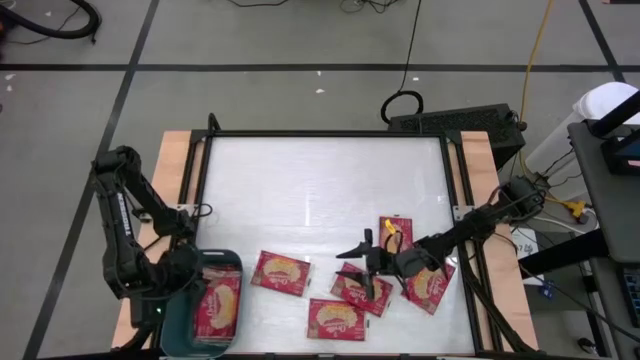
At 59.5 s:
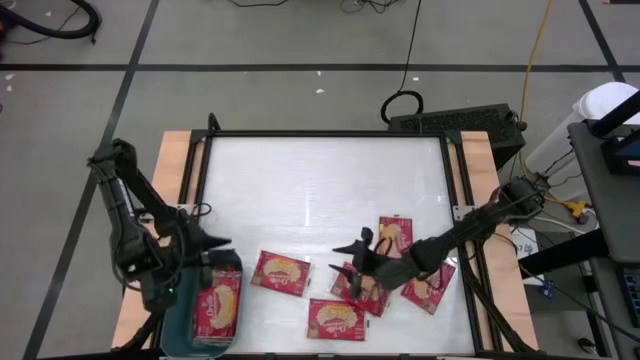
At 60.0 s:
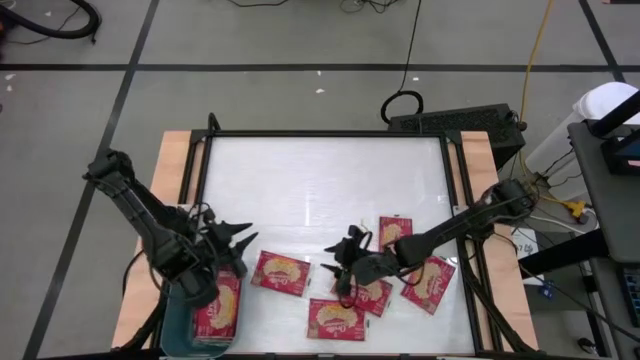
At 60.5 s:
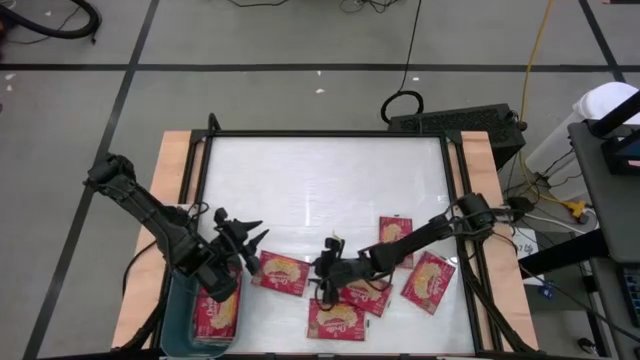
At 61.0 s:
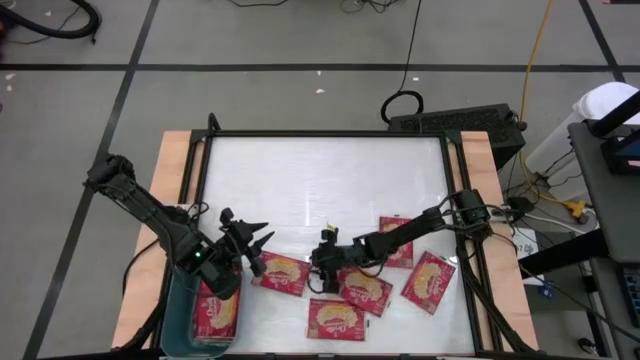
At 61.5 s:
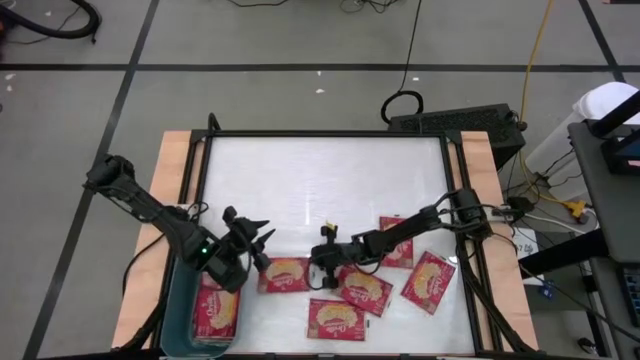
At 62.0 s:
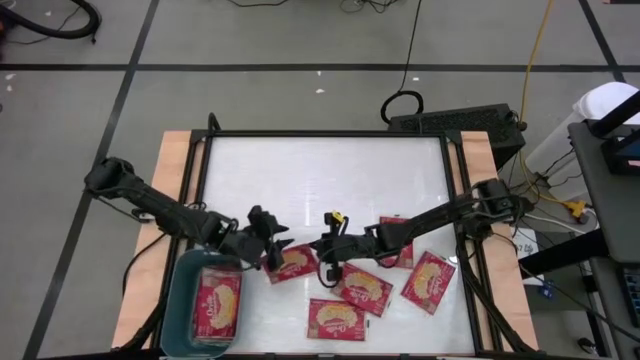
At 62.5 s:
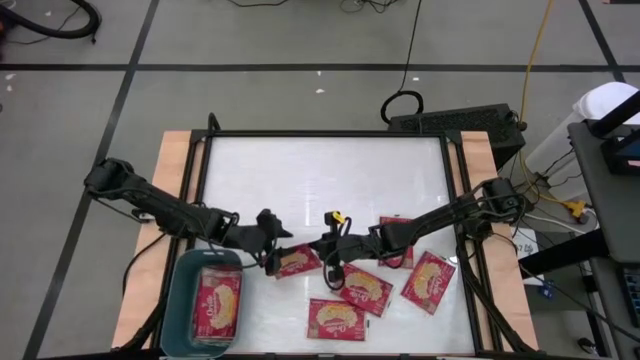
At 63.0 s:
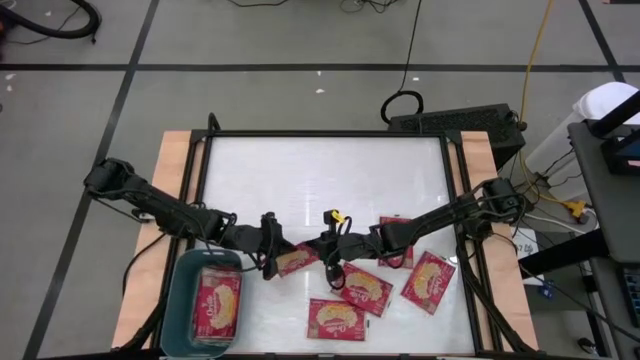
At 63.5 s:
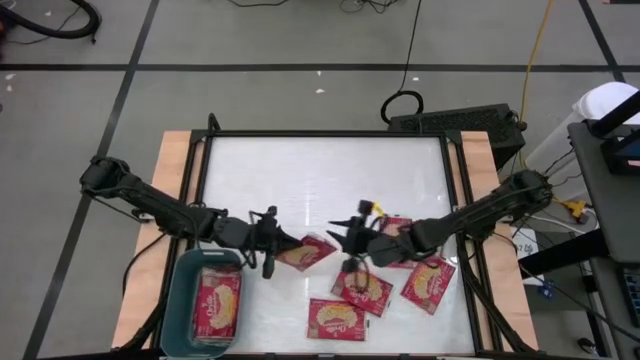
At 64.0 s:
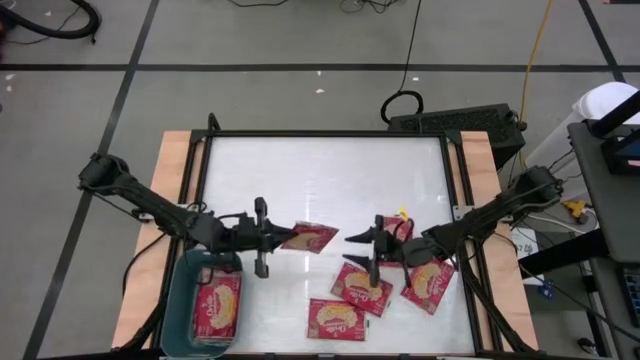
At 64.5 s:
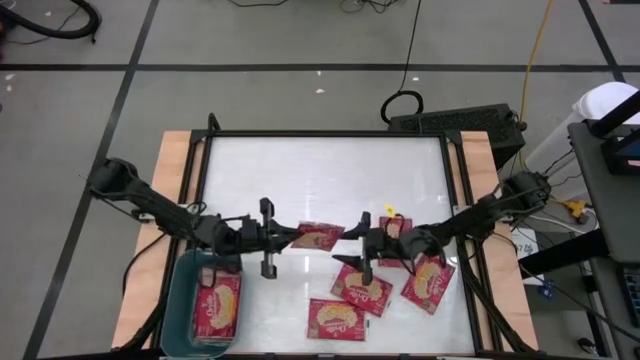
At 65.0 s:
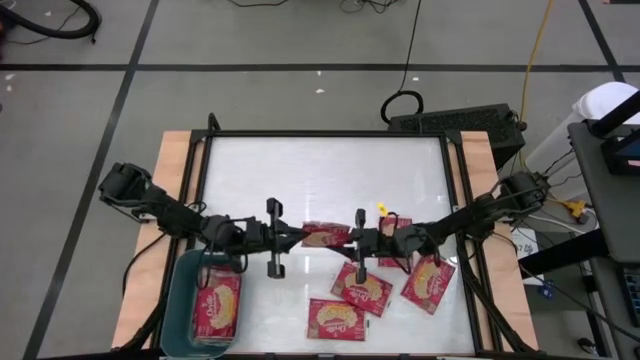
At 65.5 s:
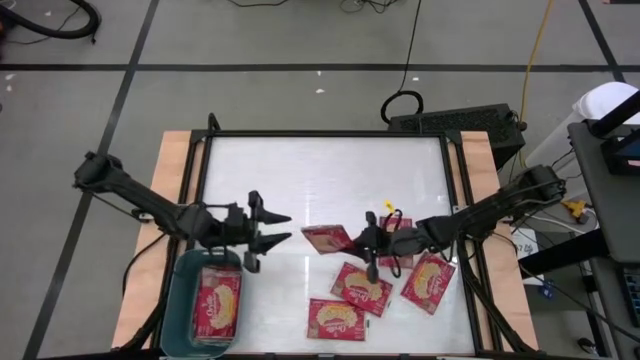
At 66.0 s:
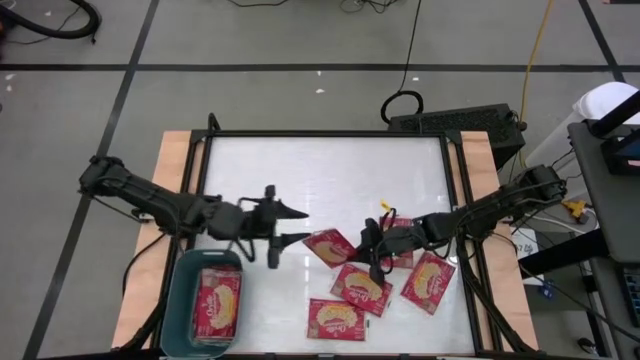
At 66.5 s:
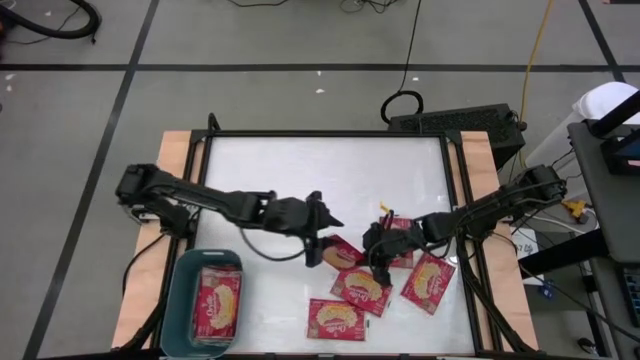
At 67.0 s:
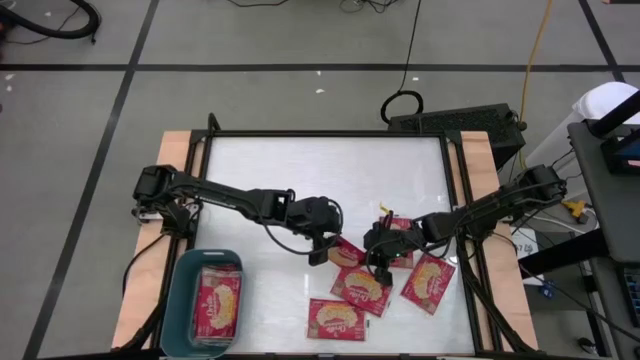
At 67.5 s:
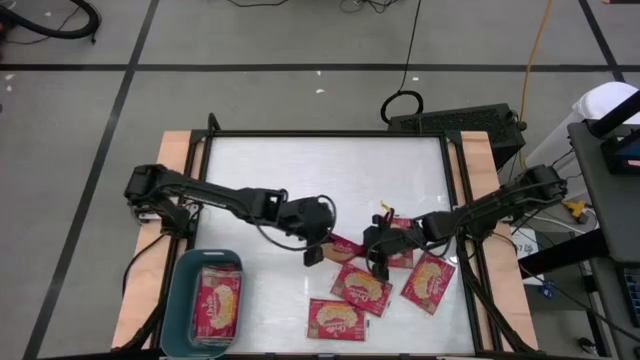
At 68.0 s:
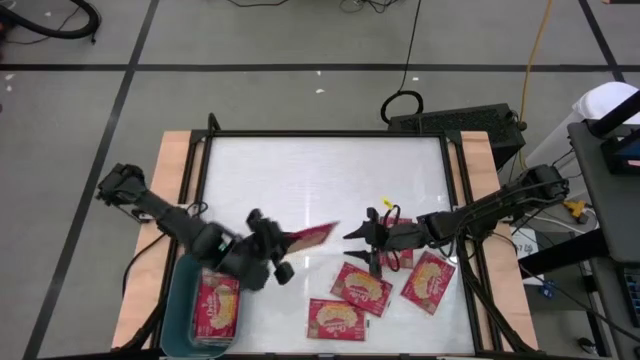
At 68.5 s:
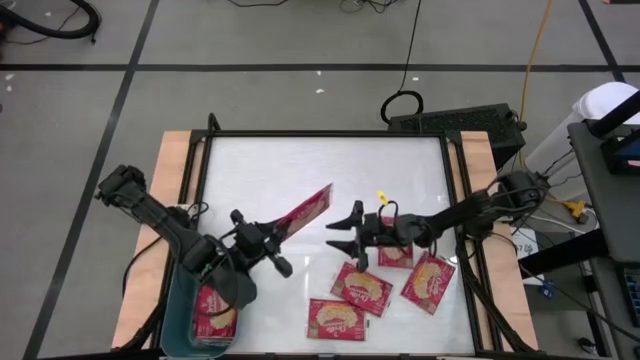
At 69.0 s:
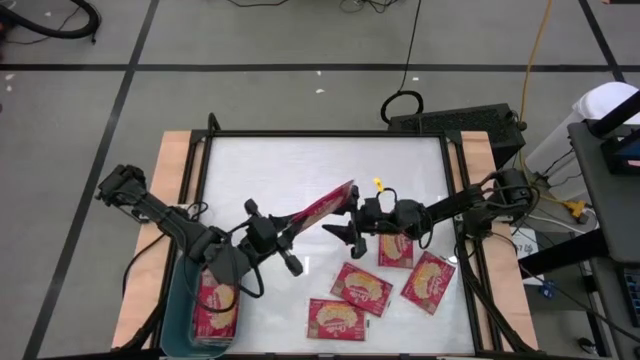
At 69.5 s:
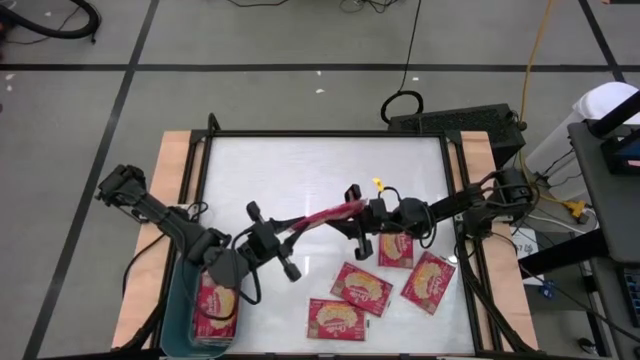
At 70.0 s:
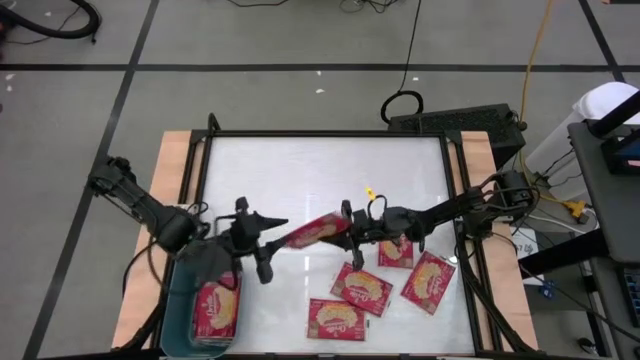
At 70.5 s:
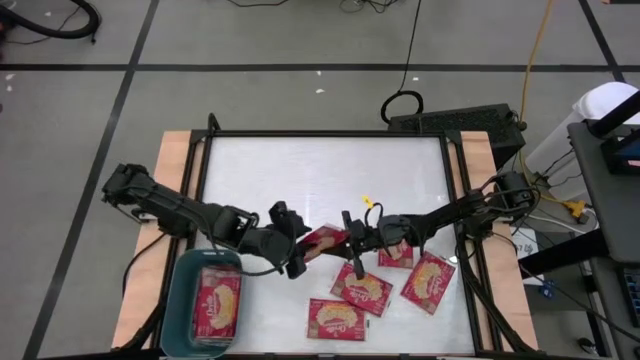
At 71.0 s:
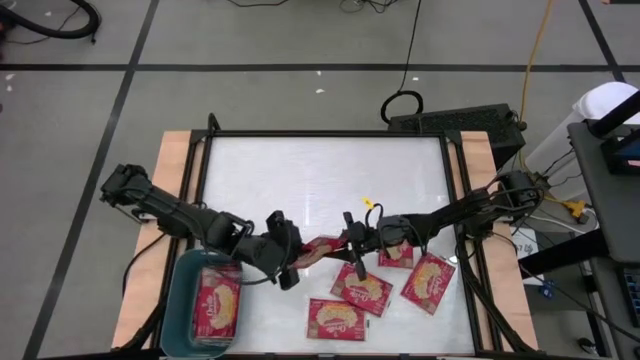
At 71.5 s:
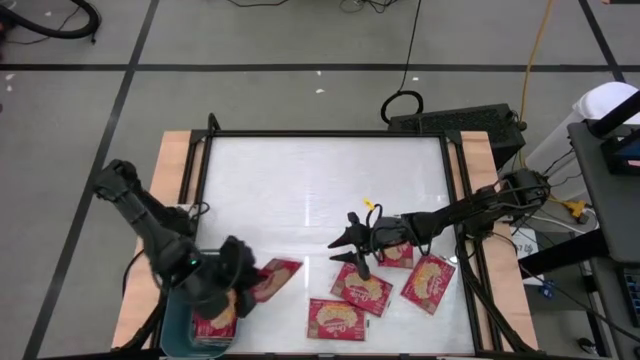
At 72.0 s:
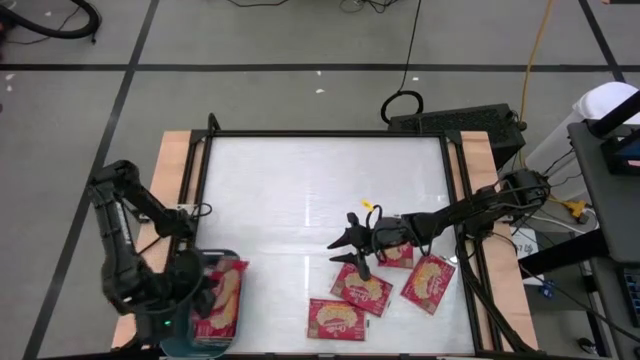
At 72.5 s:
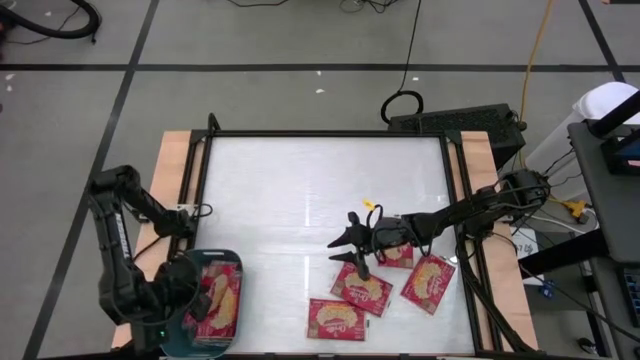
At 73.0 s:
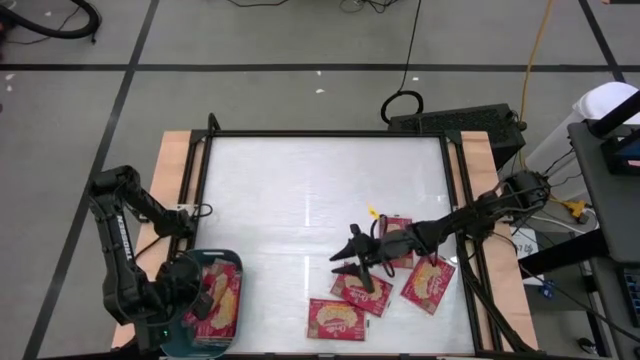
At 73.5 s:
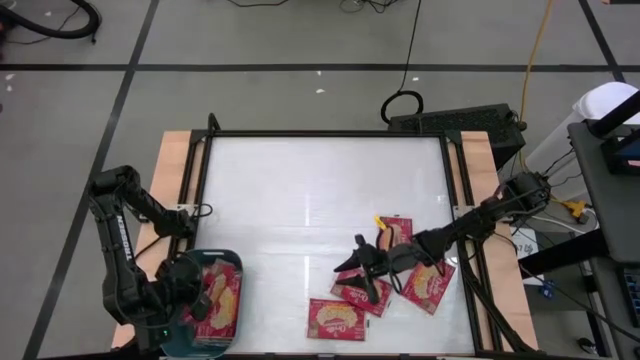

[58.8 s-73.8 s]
Task: Sort popcorn bags into baskets
Put the red popcorn bag into the blue bin

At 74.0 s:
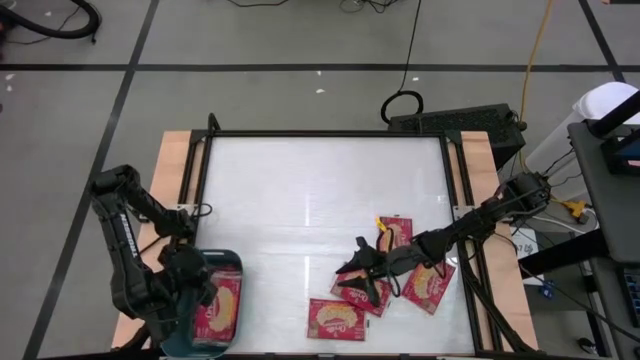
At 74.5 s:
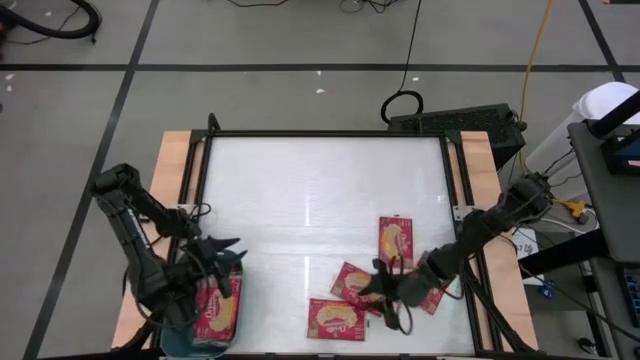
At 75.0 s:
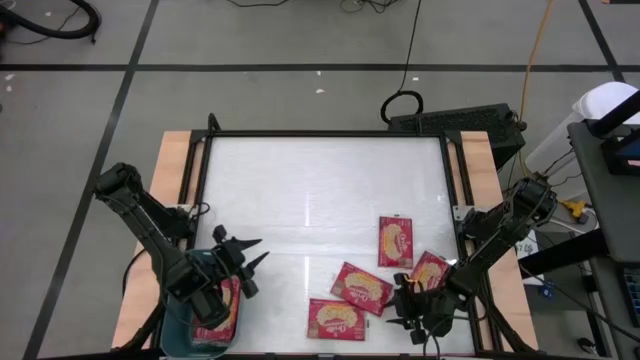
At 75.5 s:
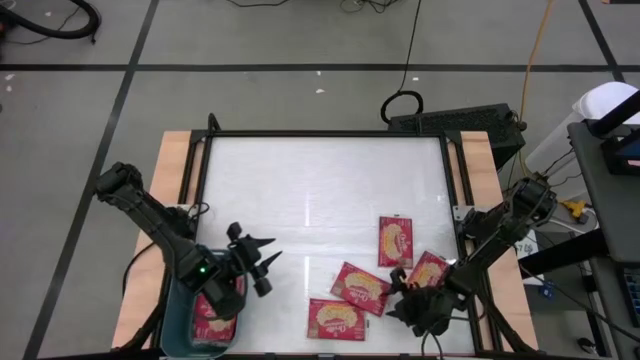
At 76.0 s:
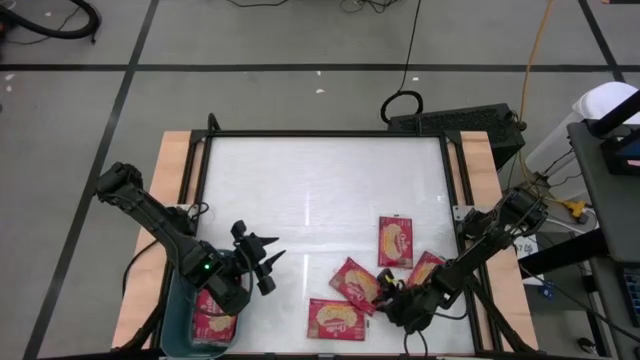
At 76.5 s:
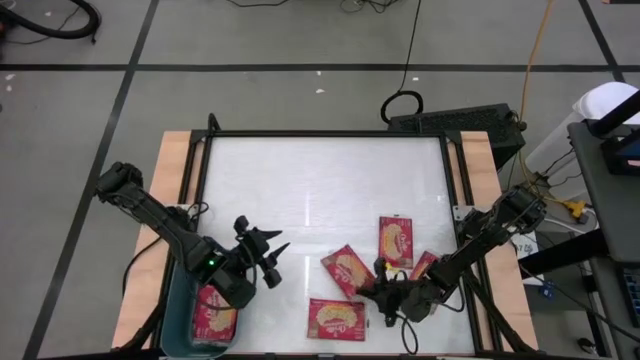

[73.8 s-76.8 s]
Put the red popcorn bag into the blue bin

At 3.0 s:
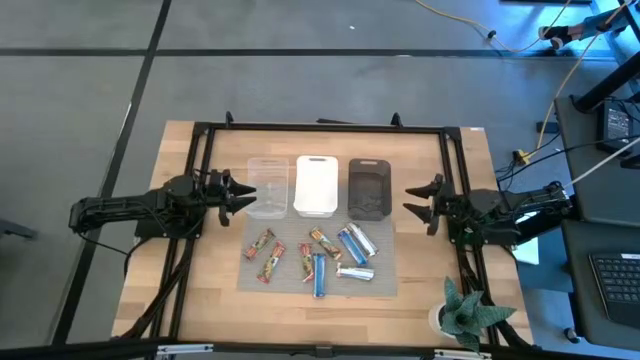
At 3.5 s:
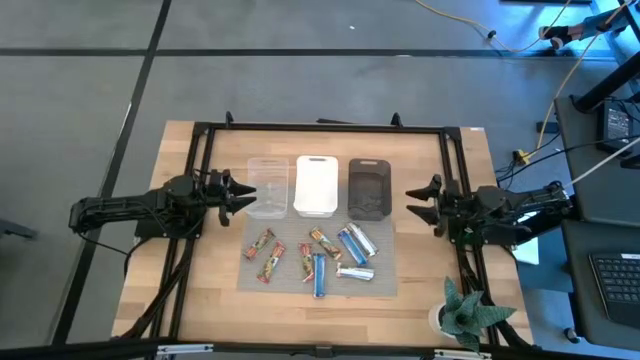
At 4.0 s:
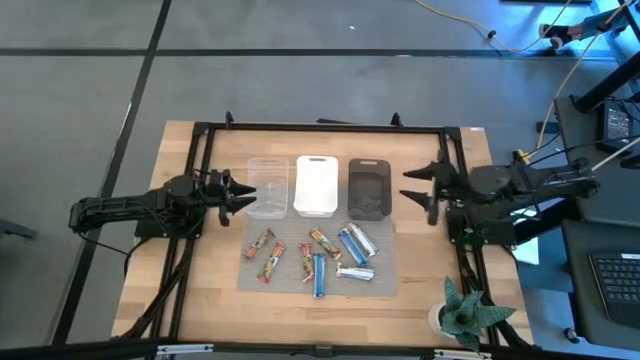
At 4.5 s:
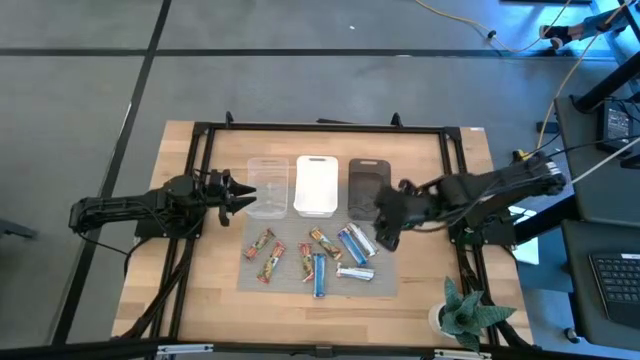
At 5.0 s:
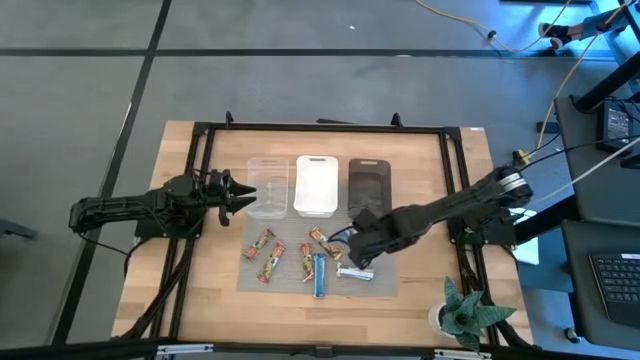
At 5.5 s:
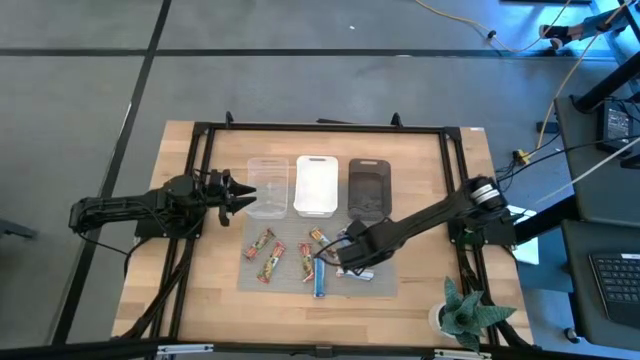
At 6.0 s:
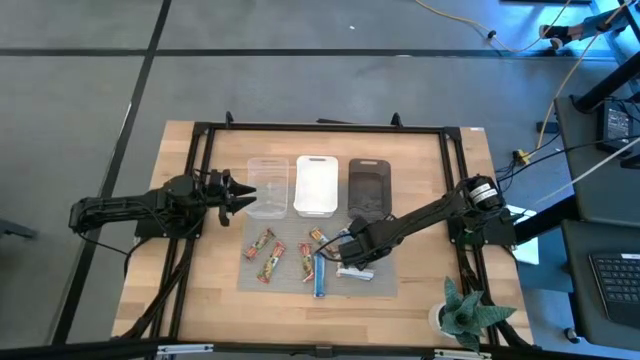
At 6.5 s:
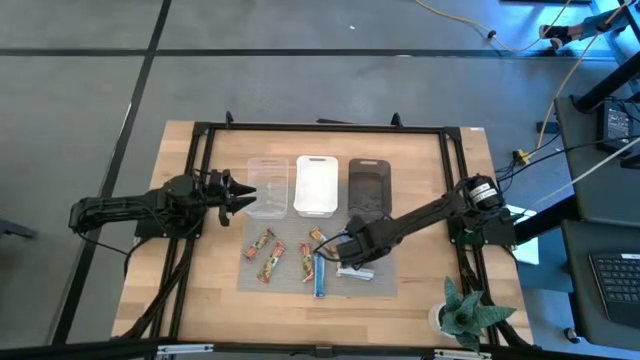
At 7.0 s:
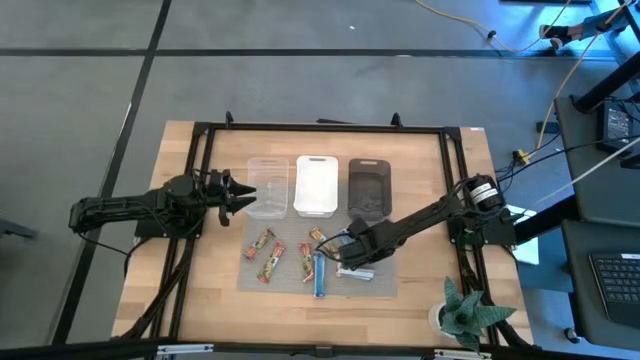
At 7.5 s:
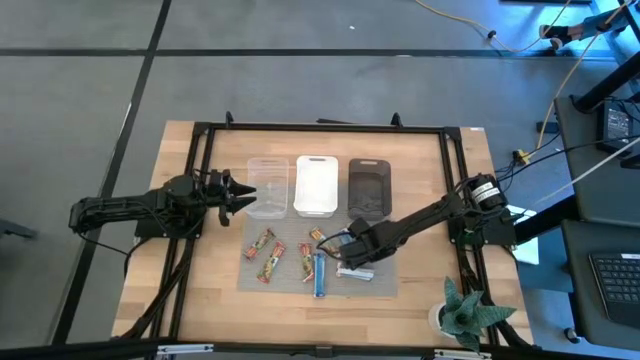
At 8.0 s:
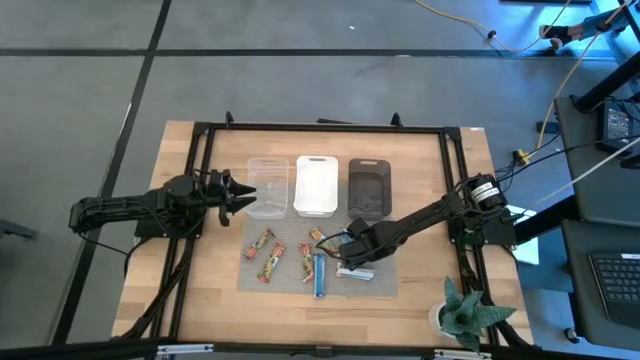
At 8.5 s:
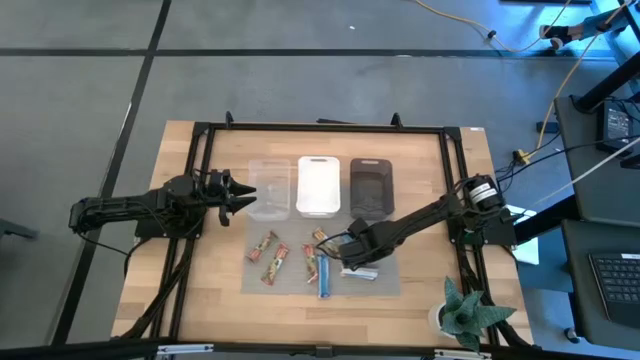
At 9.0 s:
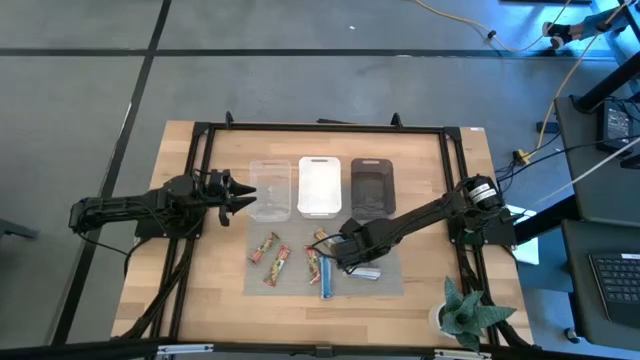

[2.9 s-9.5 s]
Task: Pick and place Granola Bars by type
Put the top right yellow granola bar into the black bin
